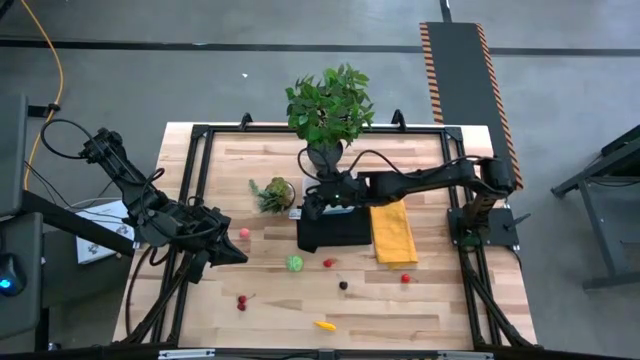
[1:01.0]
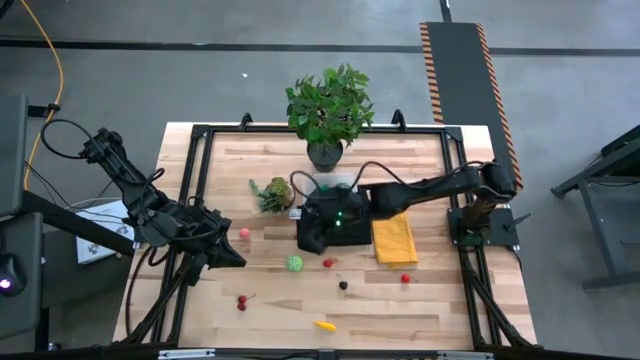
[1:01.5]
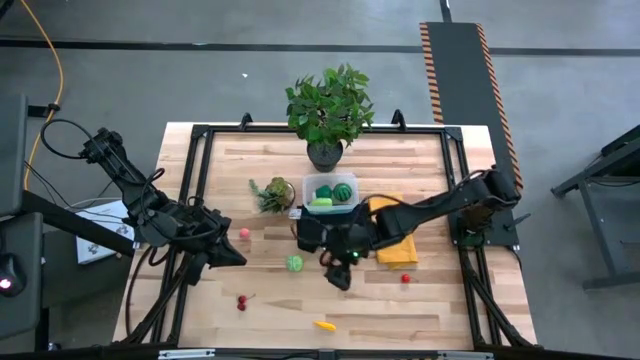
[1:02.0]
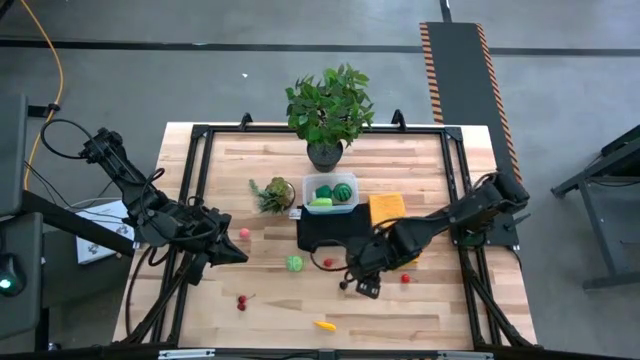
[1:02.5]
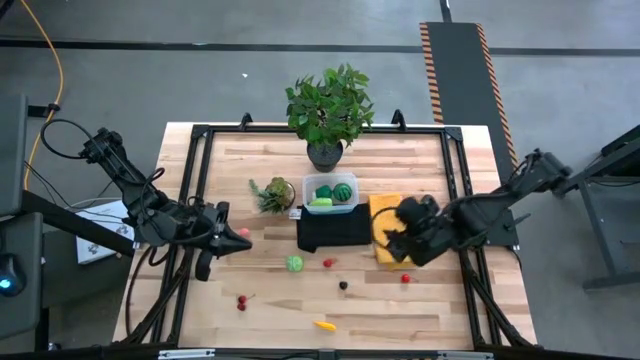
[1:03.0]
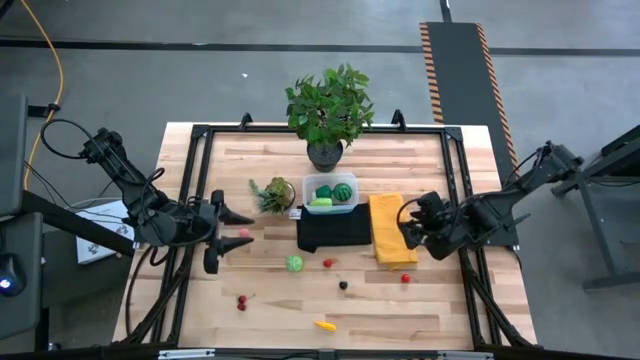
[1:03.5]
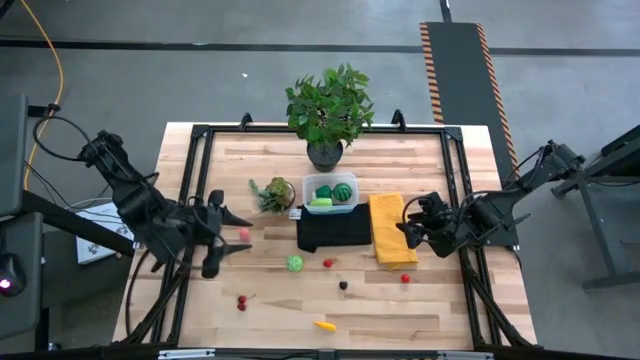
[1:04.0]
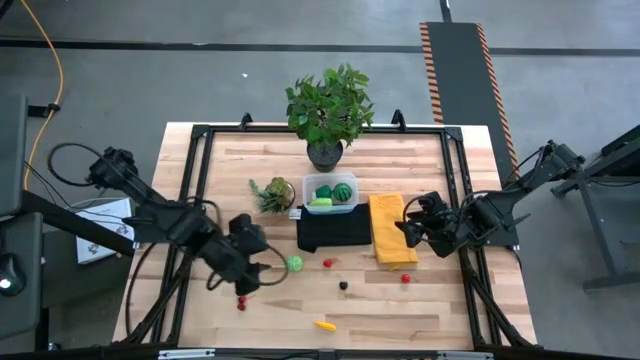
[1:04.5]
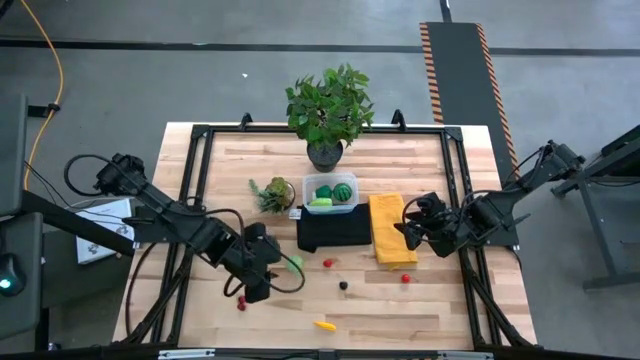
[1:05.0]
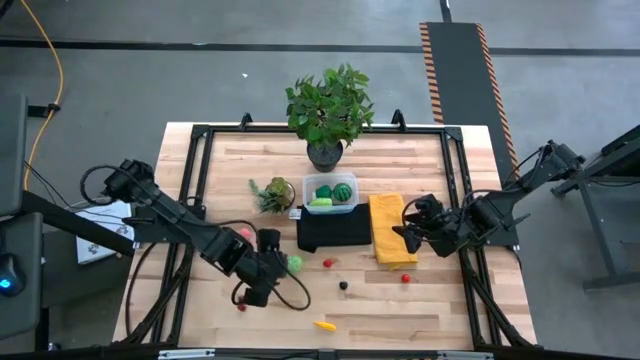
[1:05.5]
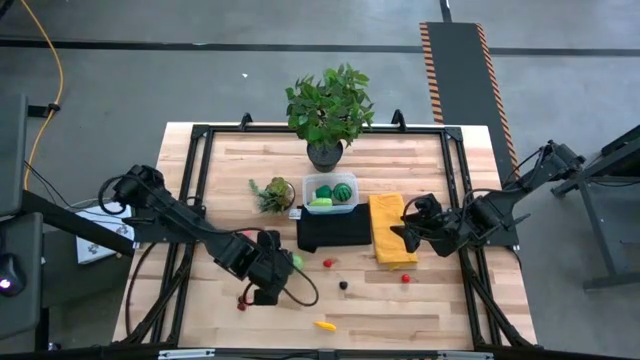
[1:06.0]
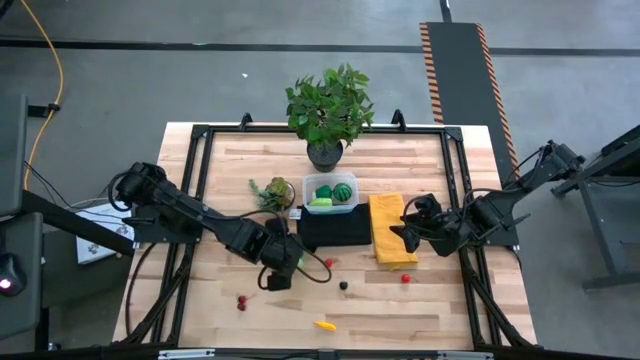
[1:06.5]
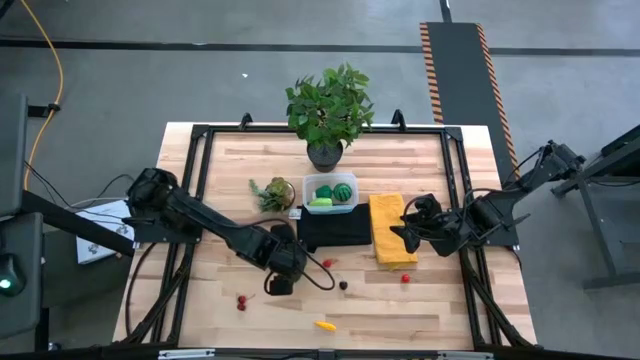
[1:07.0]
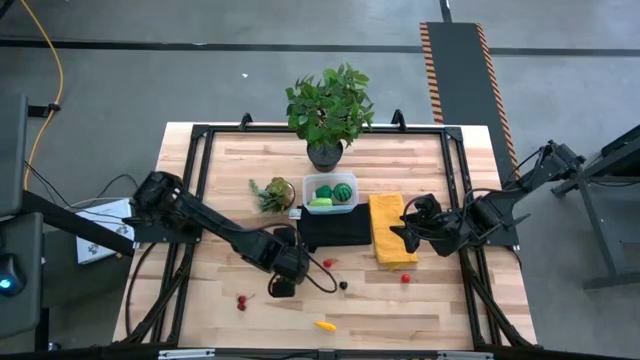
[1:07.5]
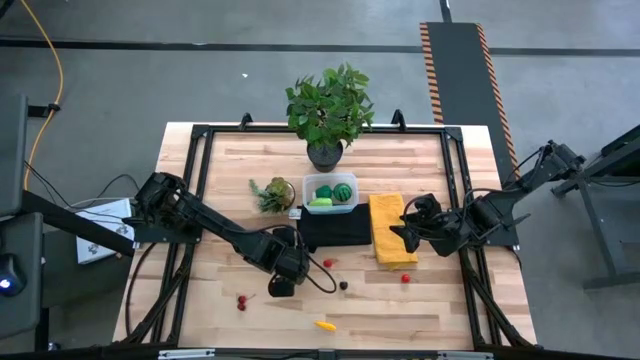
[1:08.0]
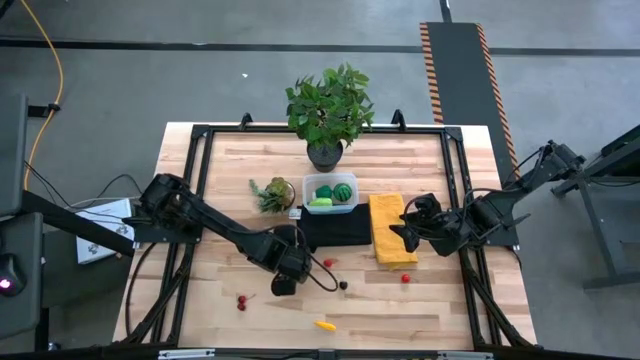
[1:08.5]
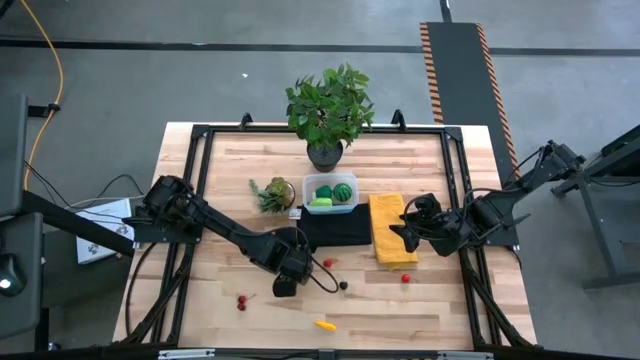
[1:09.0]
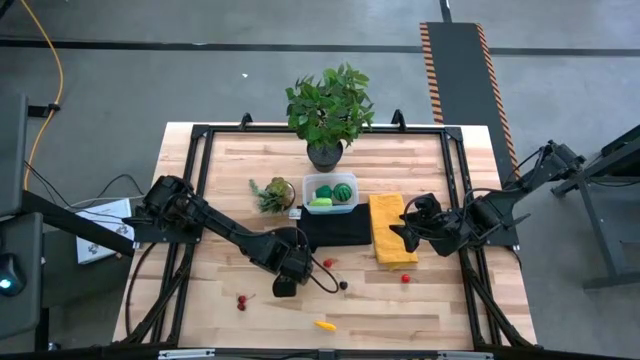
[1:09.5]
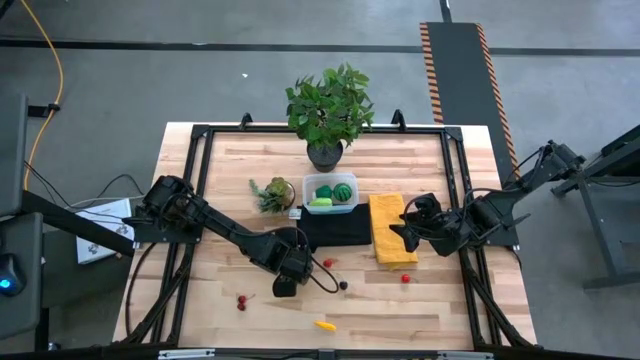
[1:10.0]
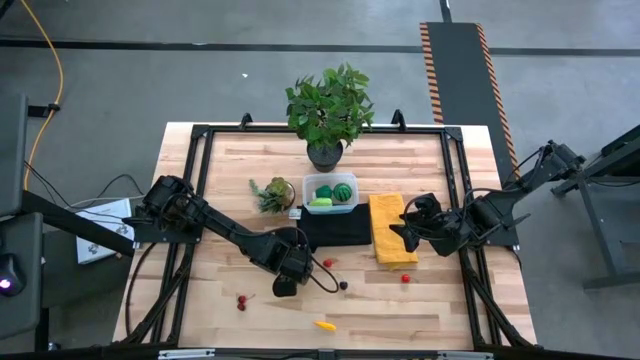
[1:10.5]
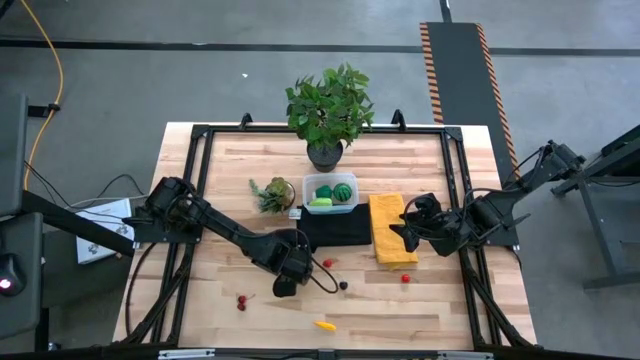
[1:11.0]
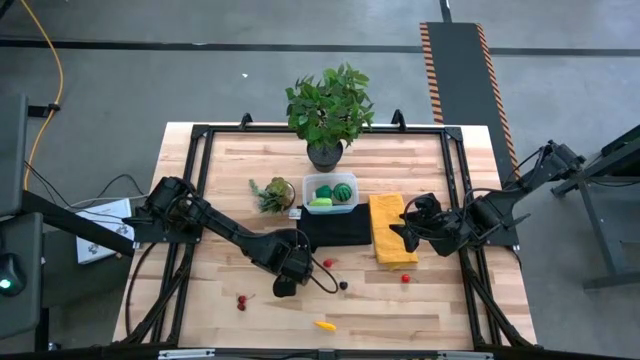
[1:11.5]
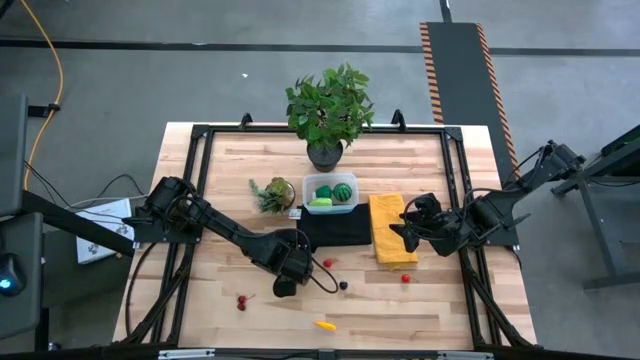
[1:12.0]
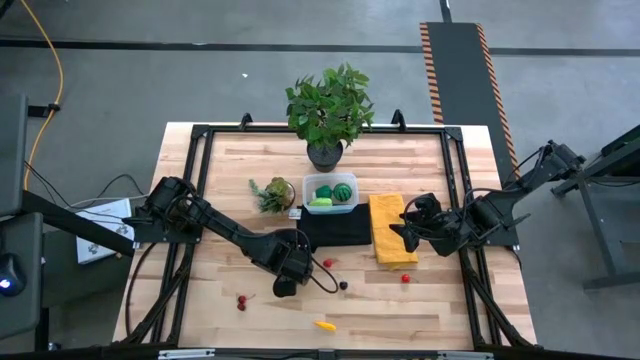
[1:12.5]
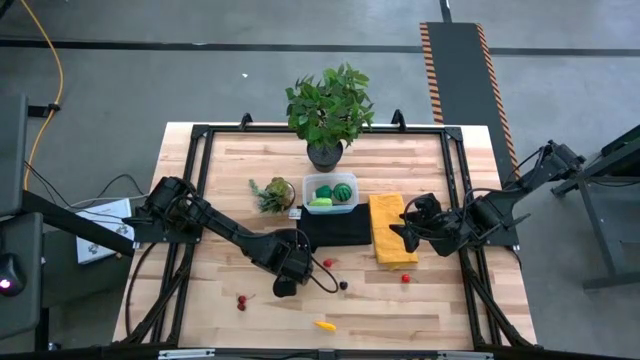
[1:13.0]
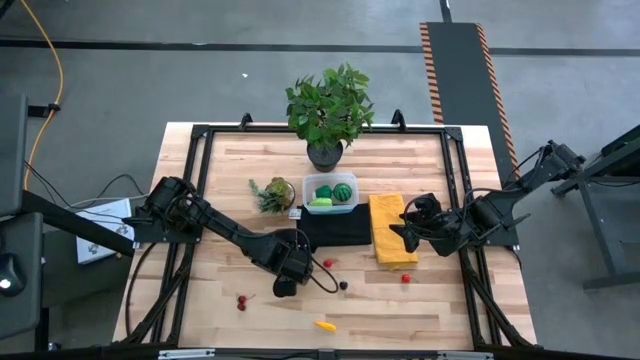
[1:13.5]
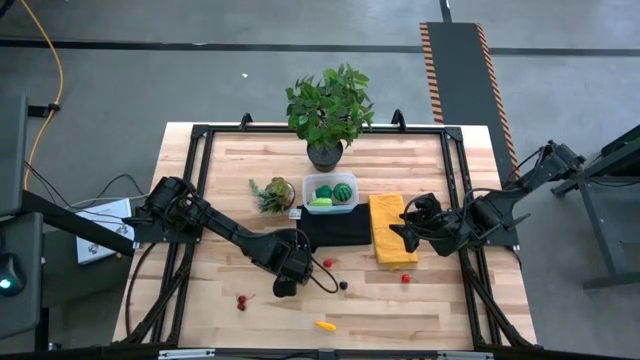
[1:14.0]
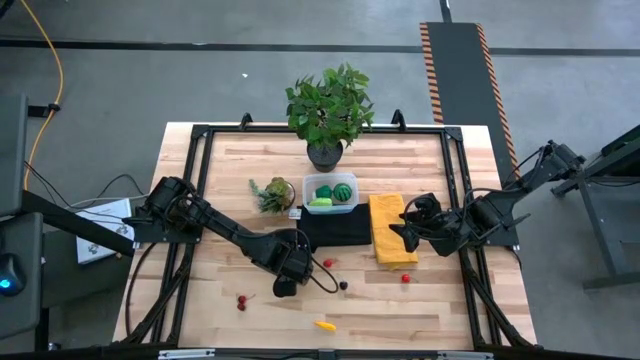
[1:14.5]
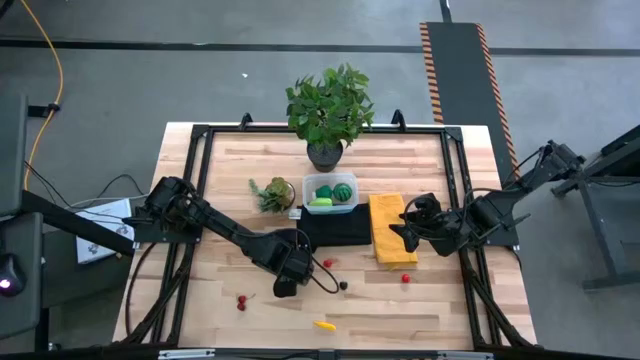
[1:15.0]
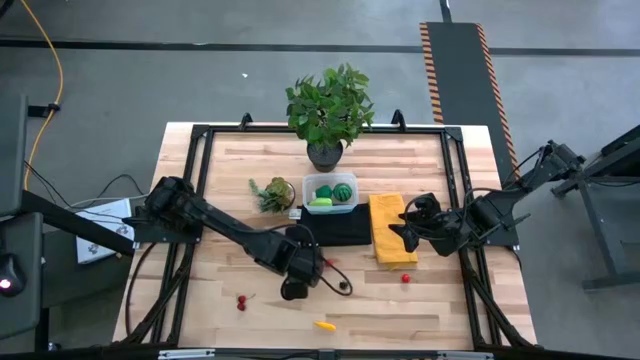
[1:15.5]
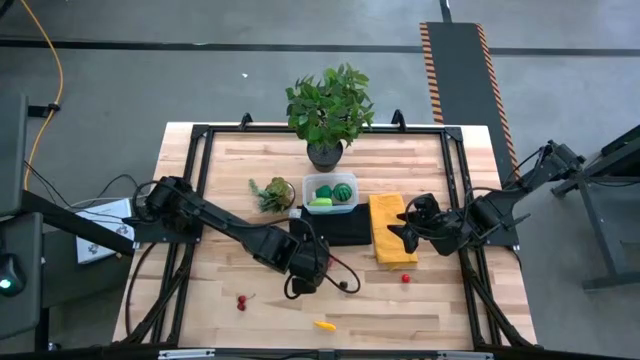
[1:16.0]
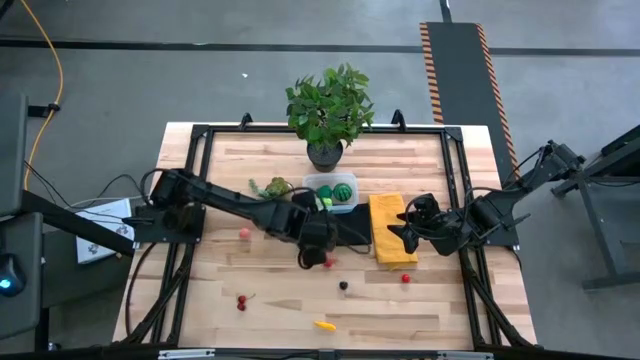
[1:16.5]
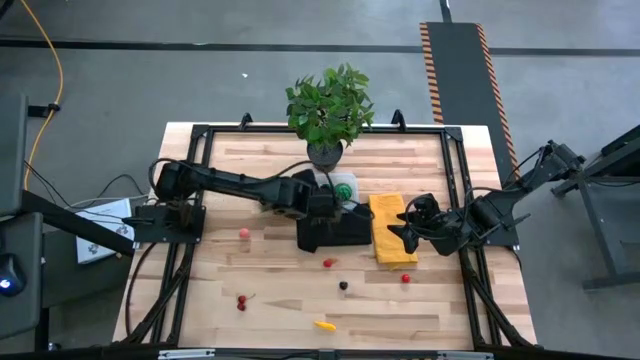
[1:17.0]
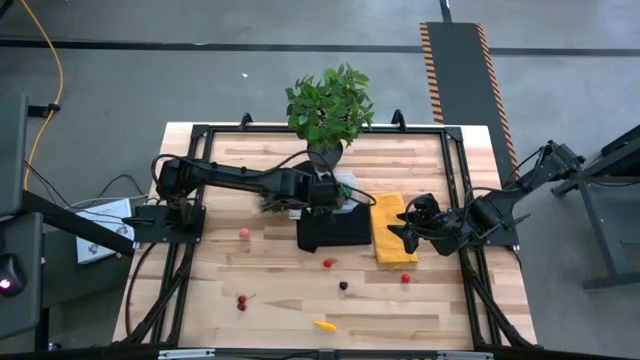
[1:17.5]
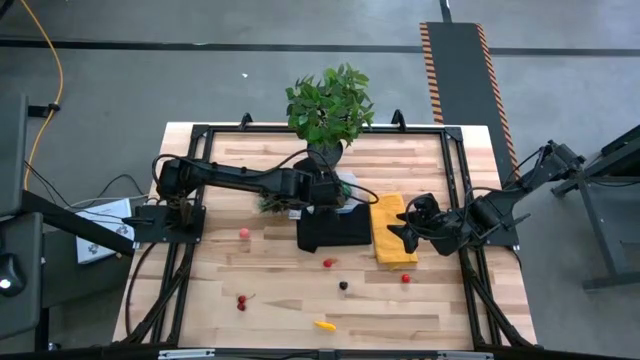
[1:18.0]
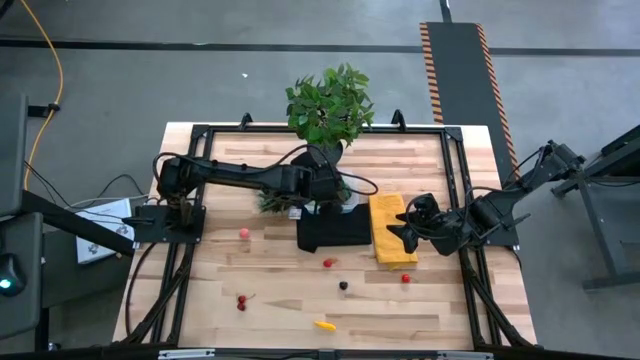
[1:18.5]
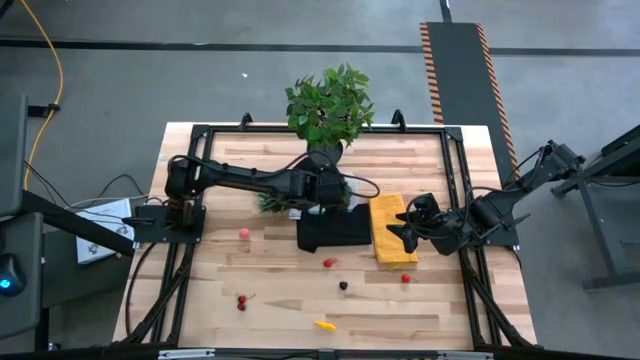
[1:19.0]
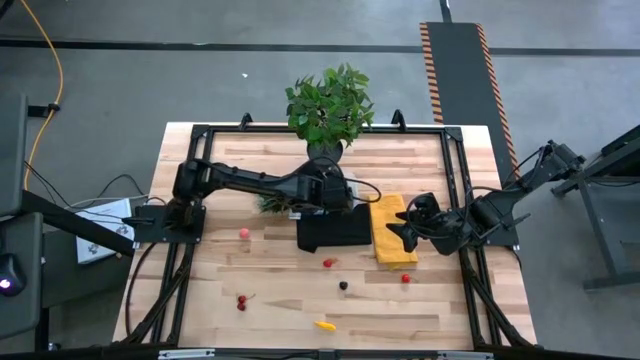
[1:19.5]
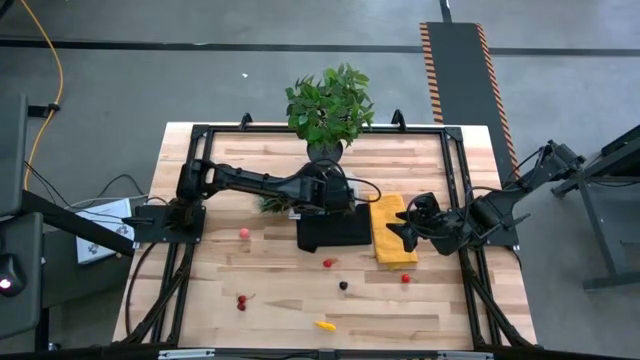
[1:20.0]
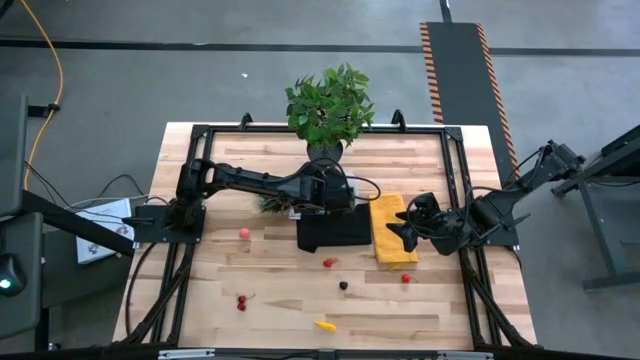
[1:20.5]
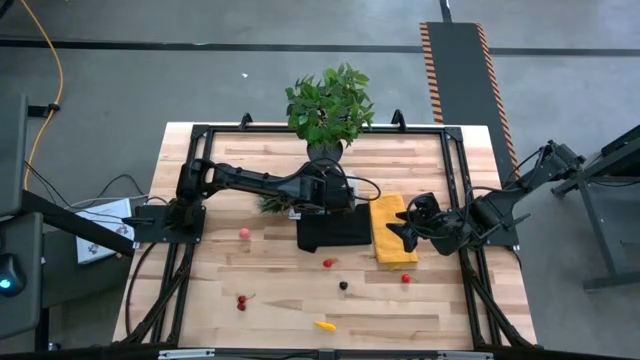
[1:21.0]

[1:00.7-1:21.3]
Task: Pick and placing Produce into tupperware
Put the cabbage into the transparent bin
